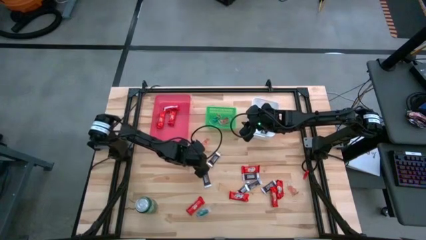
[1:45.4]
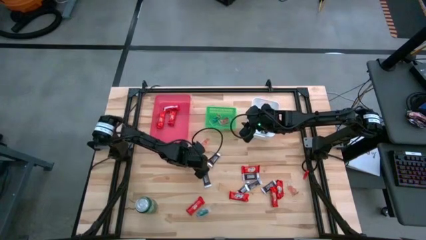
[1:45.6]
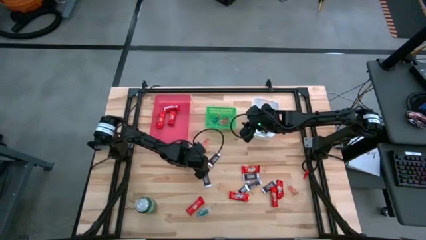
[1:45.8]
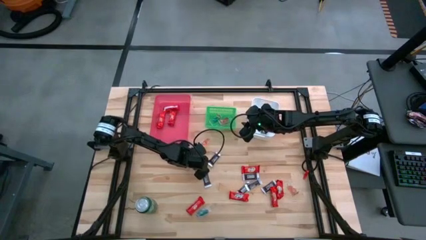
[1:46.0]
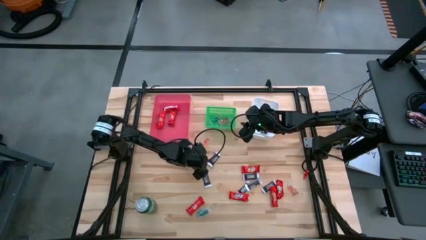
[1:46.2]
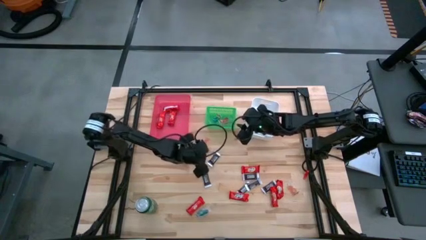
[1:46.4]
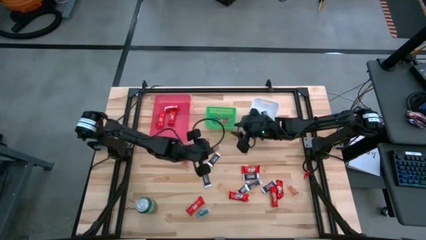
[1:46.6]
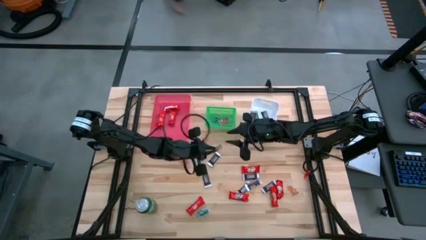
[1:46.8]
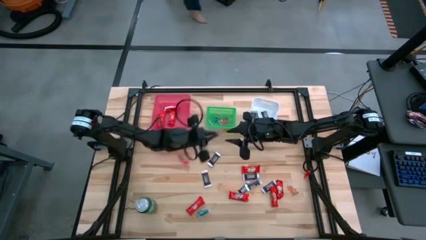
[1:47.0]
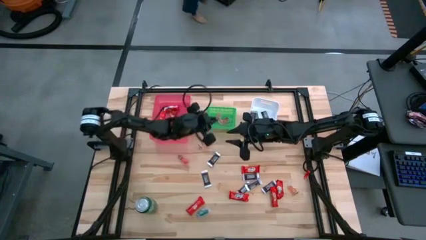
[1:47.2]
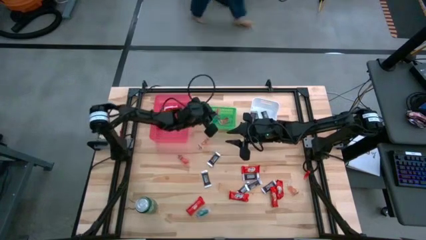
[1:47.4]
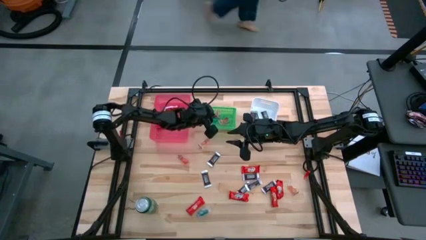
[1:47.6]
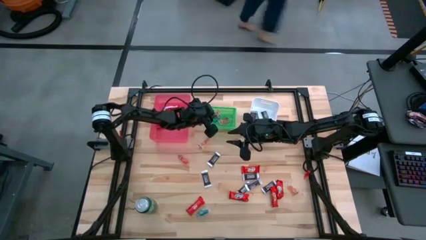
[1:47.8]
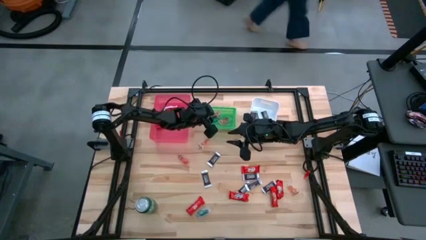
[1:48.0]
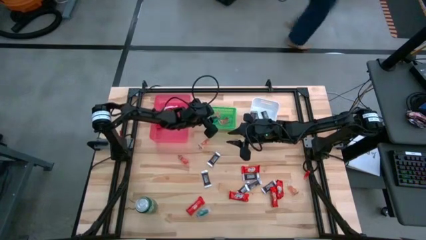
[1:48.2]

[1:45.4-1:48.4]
Task: Sort candy
Put the orange gummy into the green bin

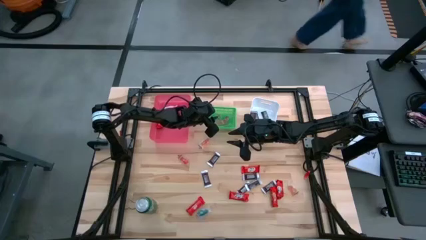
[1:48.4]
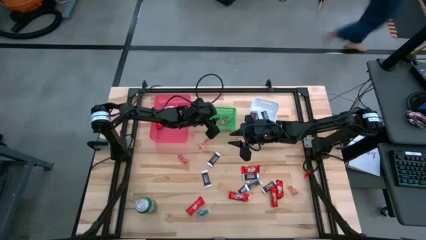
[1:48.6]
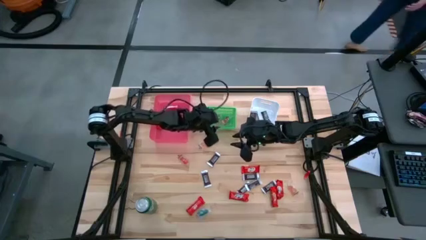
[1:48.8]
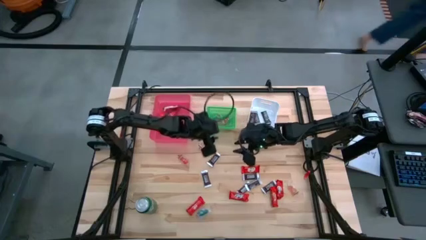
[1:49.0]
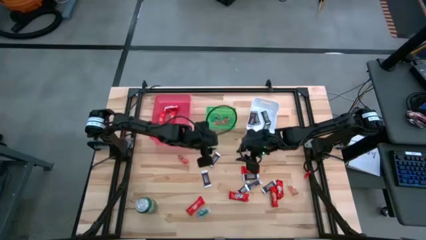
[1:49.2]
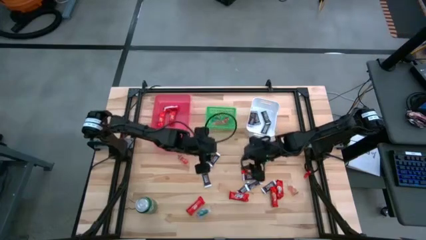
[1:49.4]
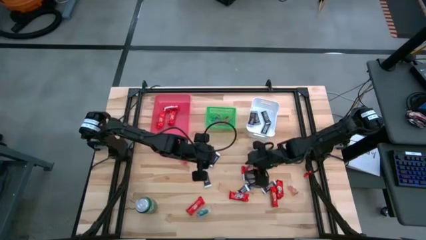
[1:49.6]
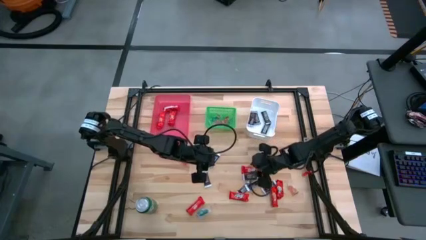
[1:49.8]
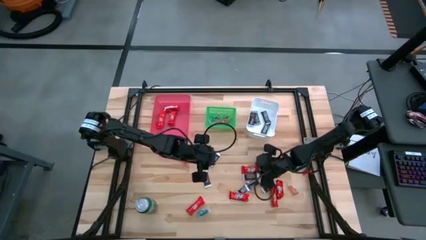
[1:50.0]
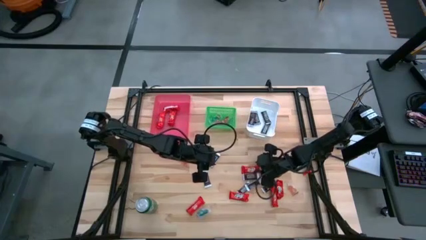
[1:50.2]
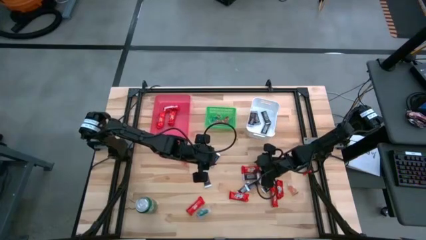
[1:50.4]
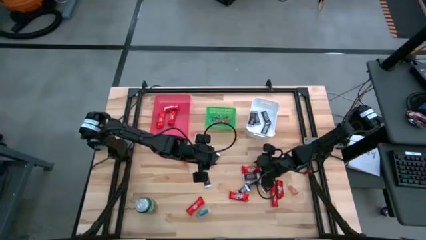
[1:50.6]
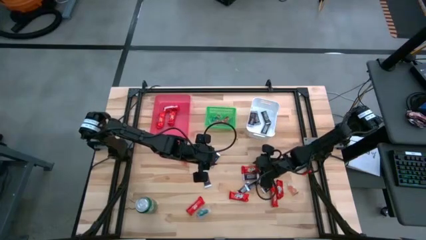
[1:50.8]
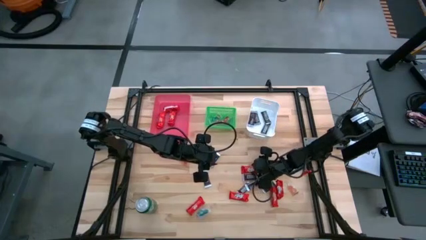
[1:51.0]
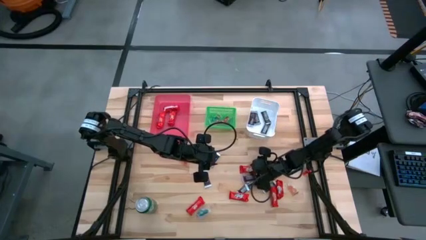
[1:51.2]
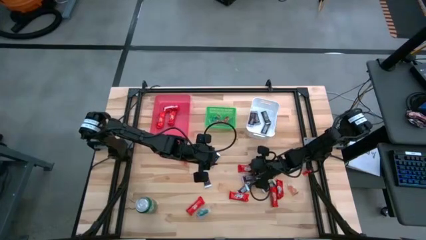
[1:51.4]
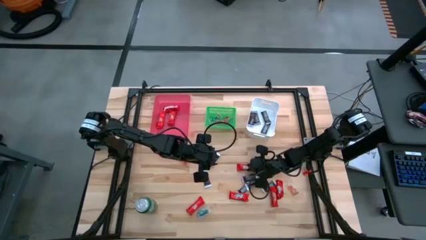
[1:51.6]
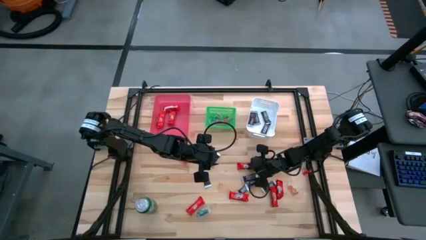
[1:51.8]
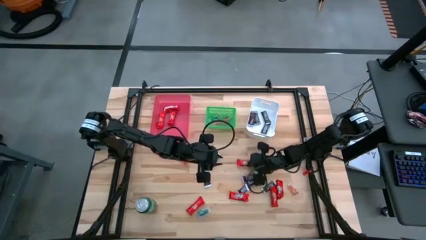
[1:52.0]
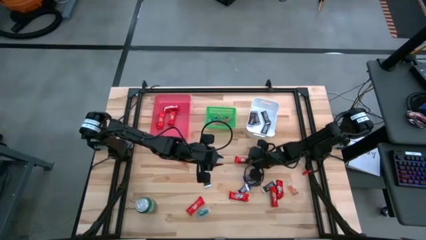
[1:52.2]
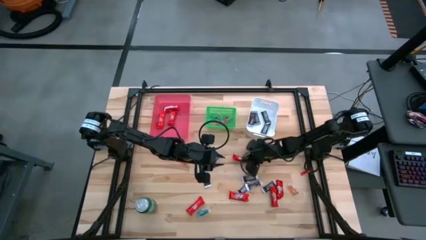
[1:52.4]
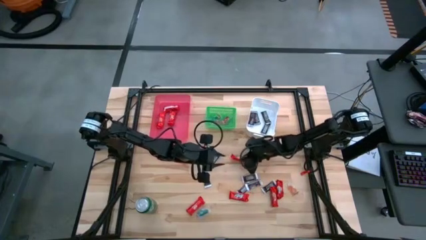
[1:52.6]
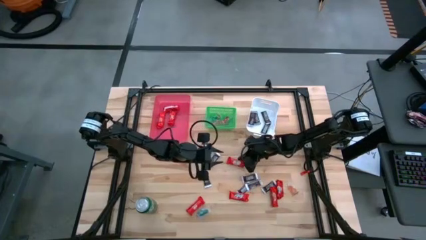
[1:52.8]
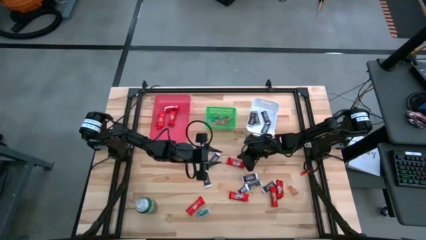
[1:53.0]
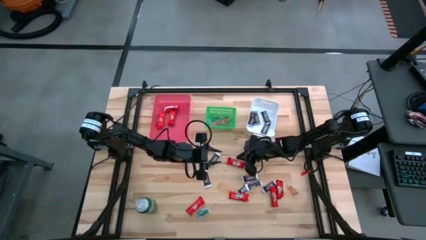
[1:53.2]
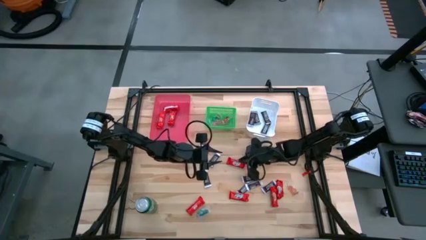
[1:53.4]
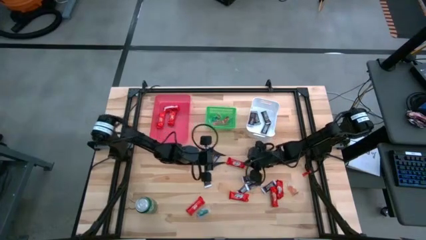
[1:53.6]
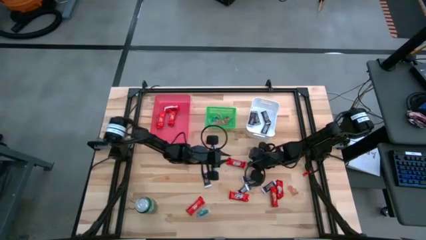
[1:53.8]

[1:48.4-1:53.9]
Put the red chocolate bar into the pink bin

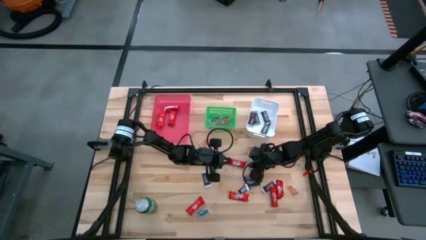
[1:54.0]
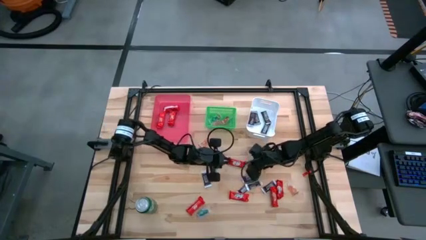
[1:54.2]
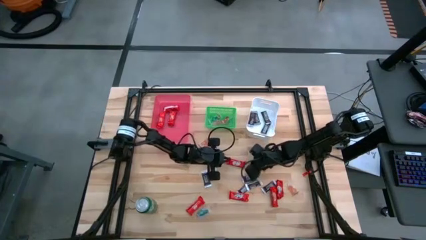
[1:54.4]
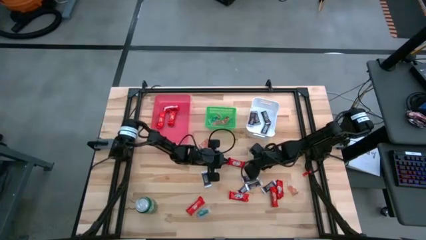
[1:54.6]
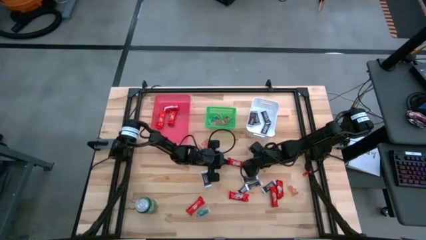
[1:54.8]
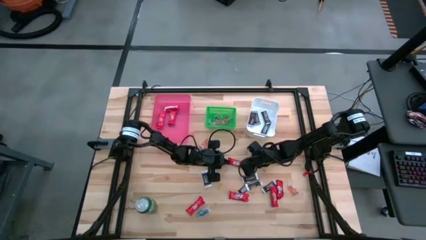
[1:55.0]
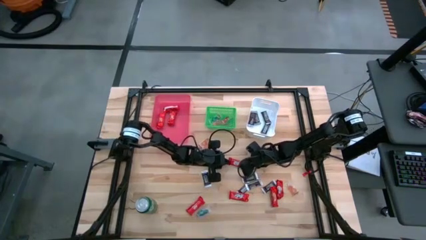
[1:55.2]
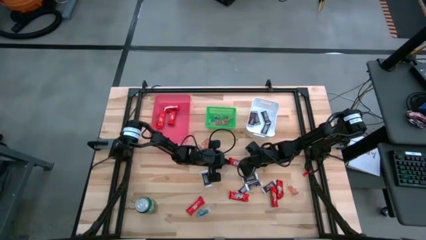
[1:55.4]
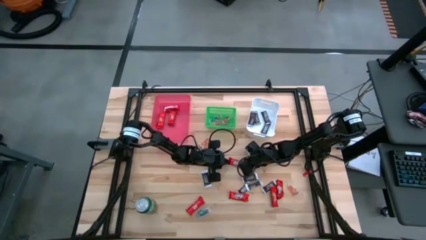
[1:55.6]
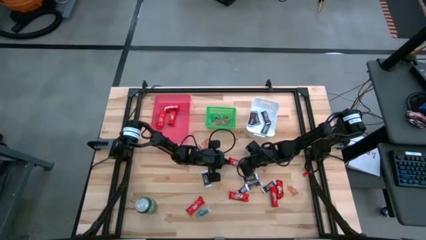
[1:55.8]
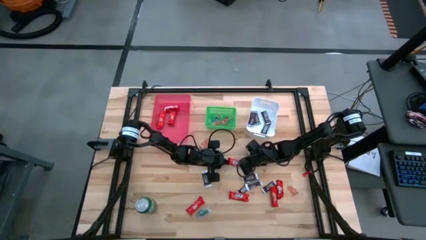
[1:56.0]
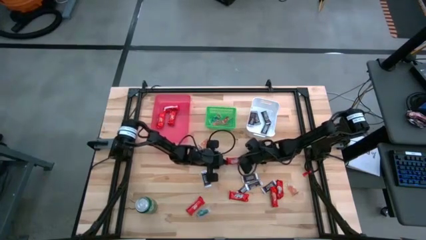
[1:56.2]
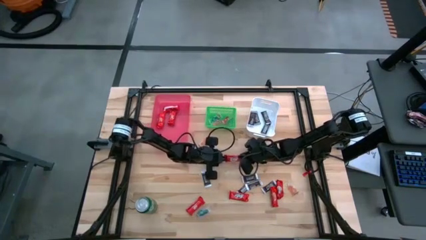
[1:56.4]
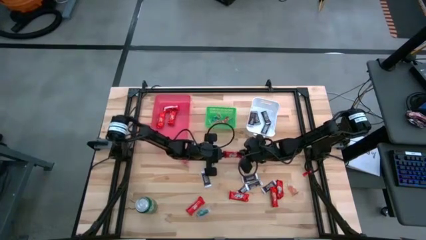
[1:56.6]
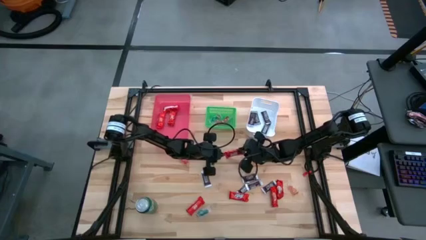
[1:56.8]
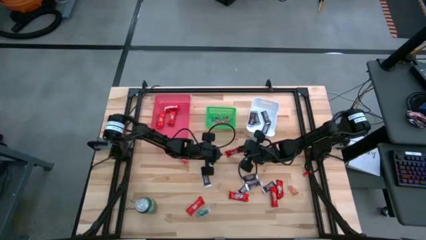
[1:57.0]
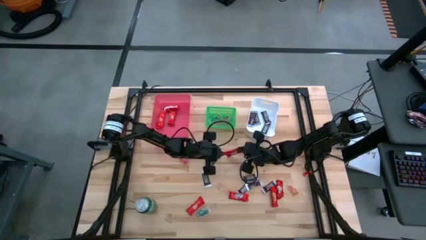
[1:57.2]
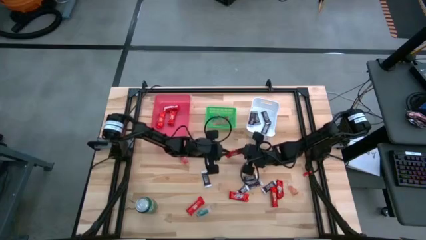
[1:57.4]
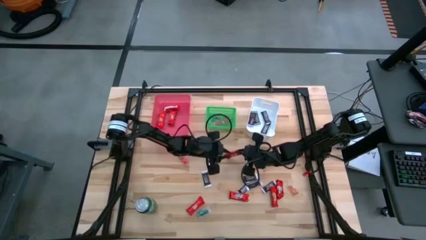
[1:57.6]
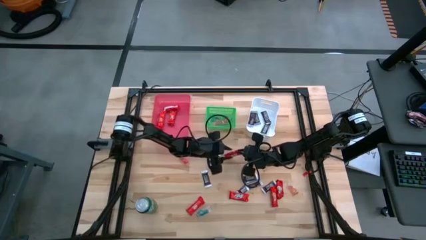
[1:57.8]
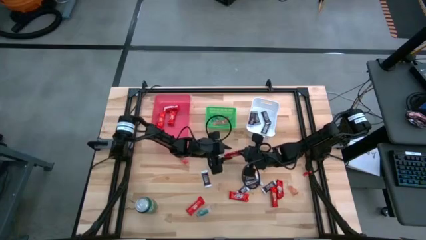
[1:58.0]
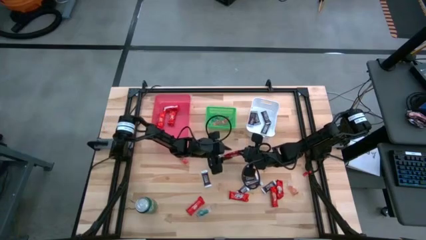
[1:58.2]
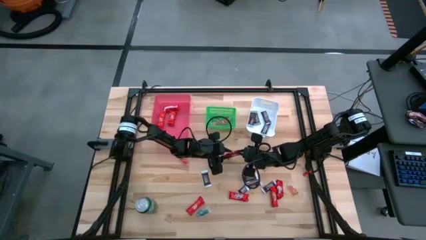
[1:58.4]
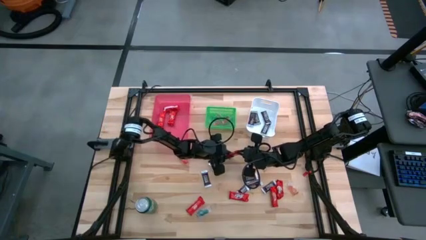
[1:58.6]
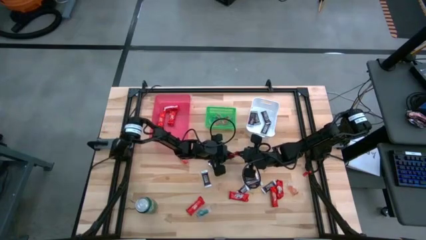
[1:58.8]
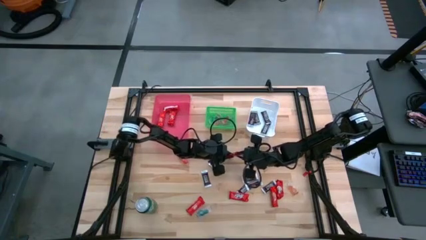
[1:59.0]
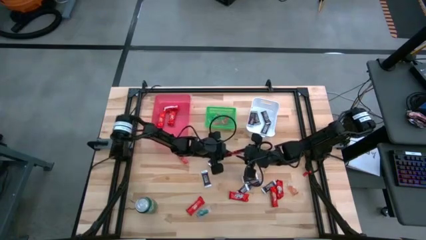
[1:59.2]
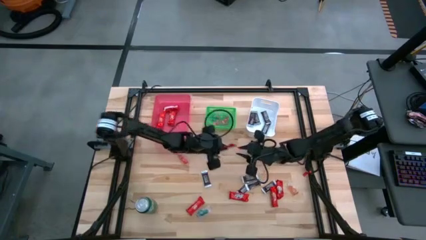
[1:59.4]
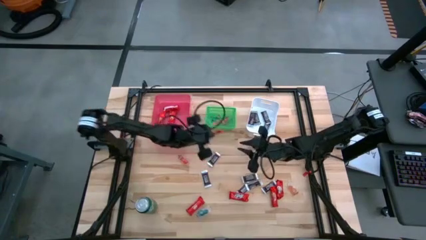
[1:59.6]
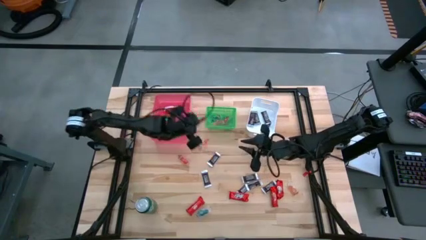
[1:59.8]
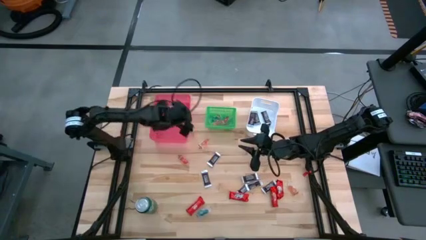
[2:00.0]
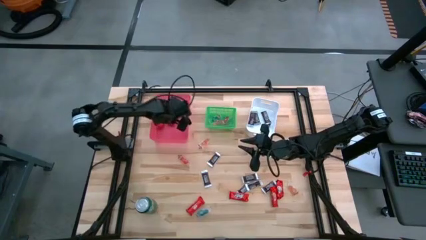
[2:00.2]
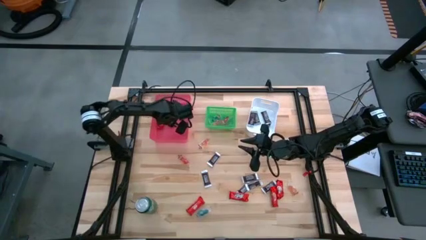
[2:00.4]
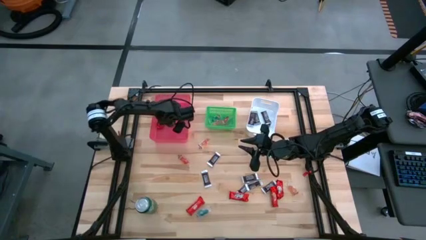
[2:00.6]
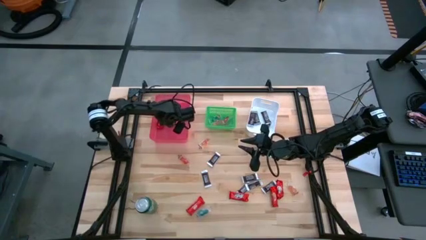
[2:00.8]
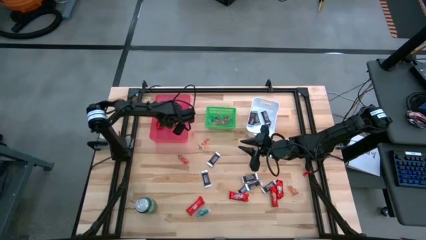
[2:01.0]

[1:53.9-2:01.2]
Put the red chocolate bar into the pink bin

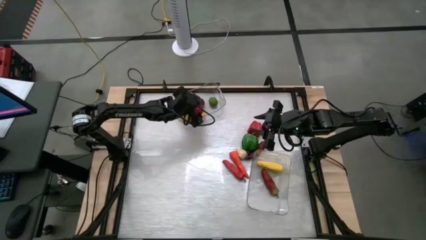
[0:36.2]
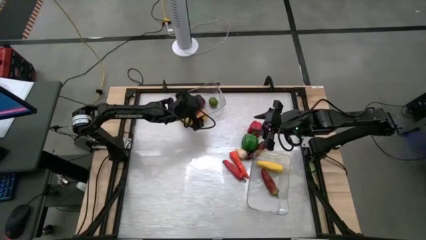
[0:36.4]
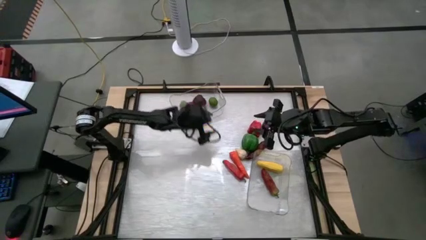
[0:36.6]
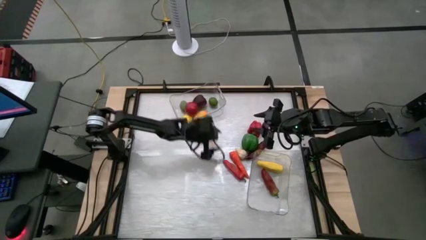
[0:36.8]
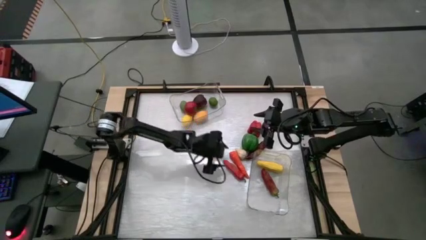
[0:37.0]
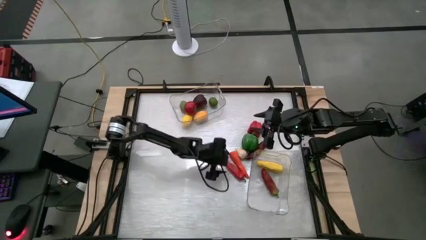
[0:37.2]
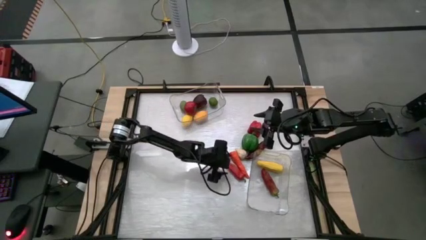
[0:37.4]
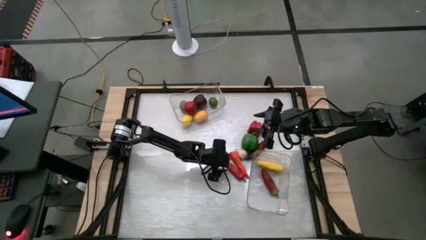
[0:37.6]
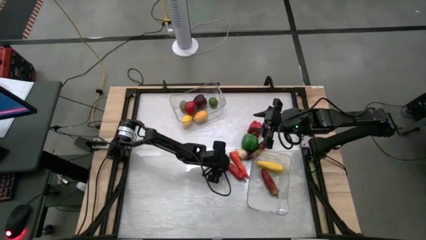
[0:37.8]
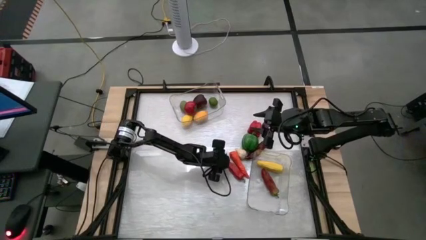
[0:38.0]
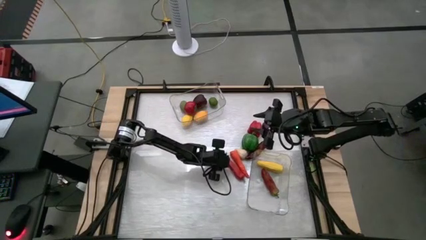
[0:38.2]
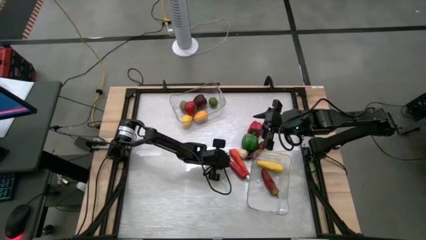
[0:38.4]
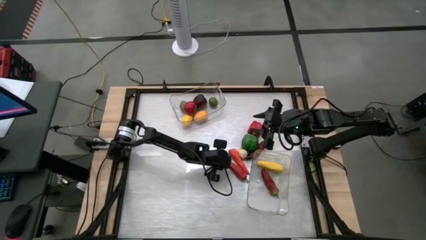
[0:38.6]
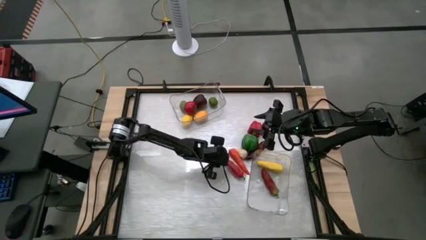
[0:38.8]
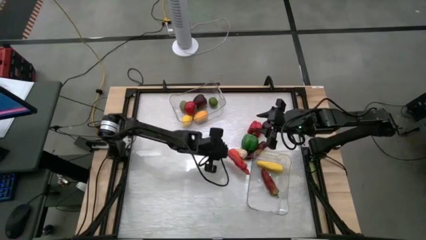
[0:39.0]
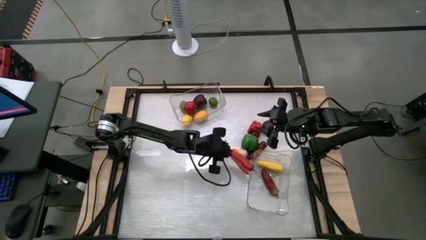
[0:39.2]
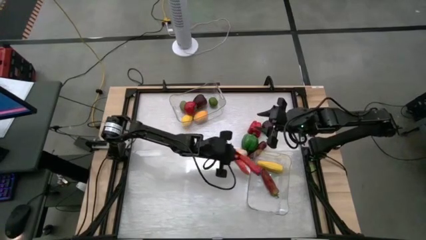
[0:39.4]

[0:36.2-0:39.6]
Task: Sort produce into baskets
Put the light red chili into the bottom transparent bin
